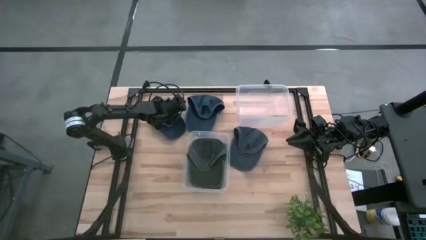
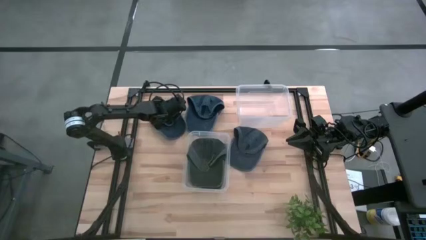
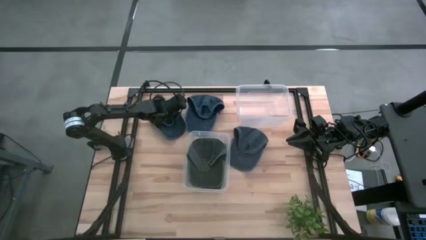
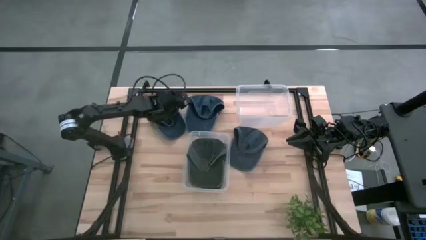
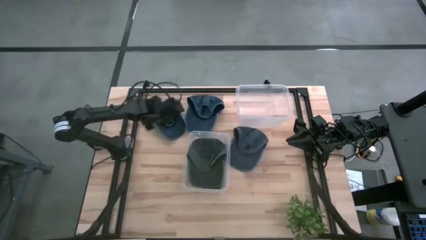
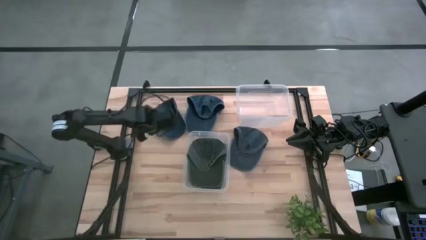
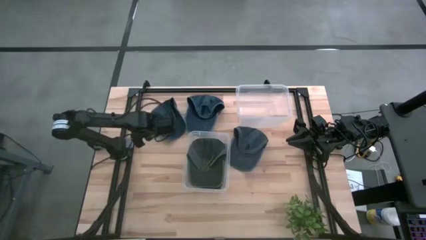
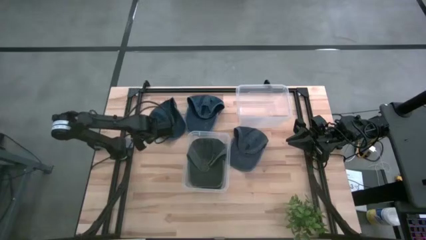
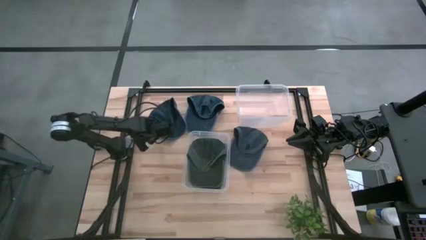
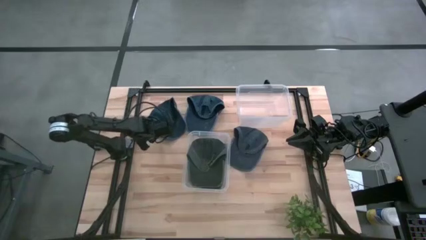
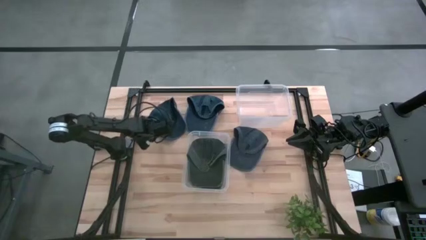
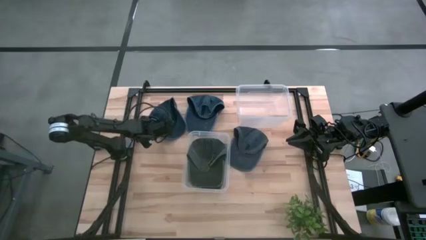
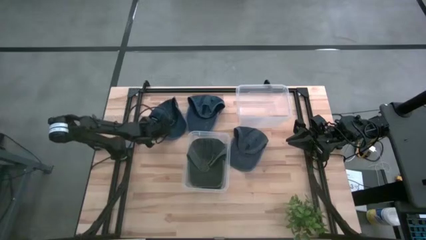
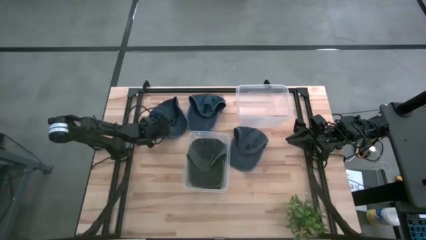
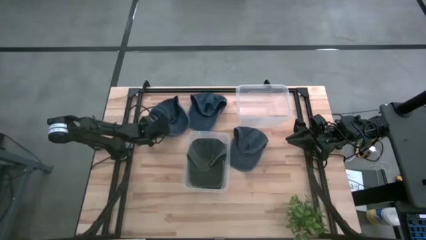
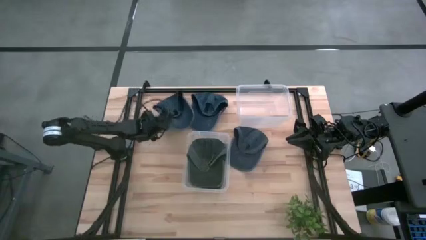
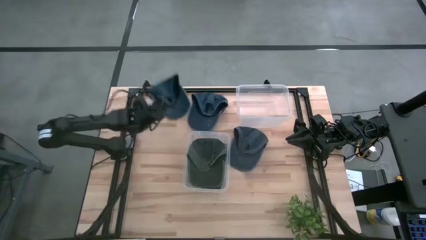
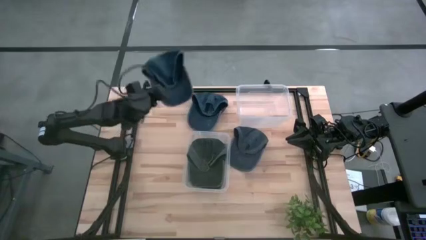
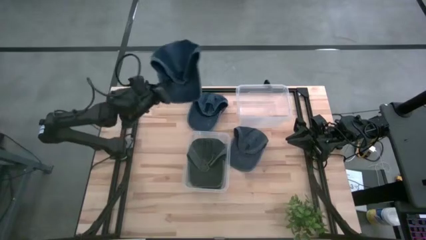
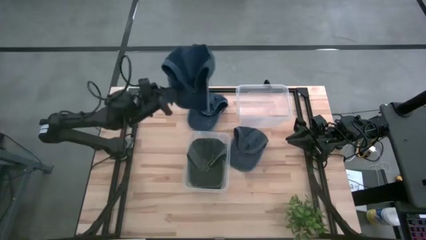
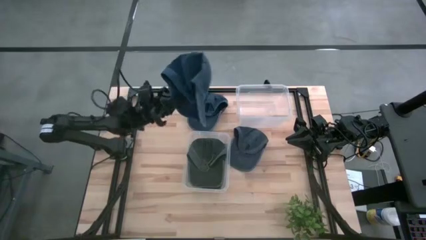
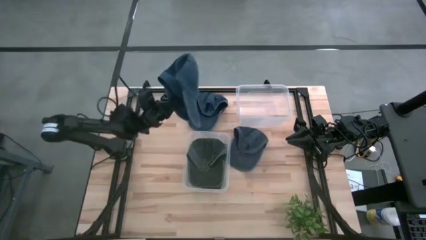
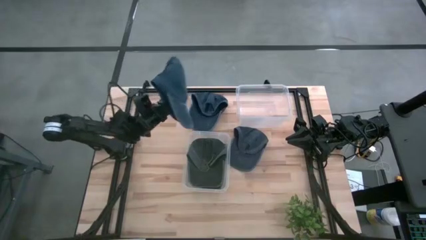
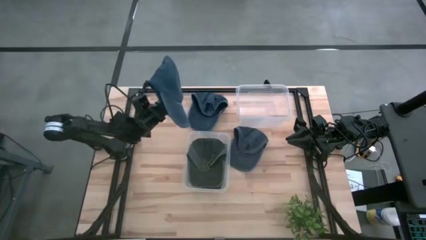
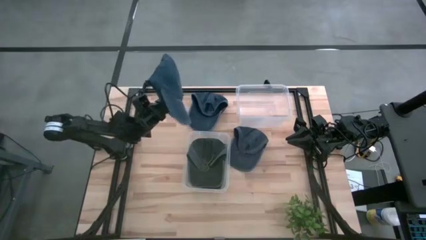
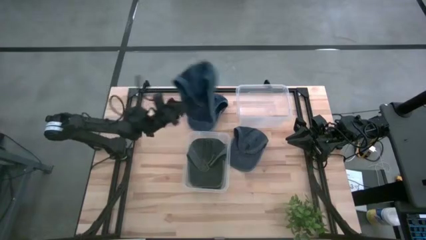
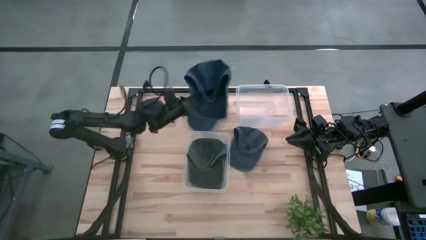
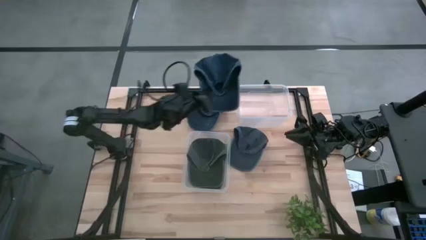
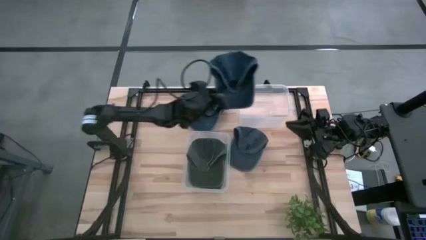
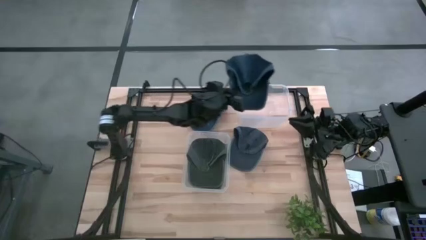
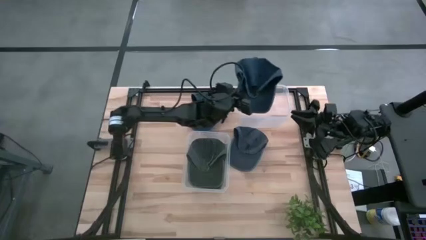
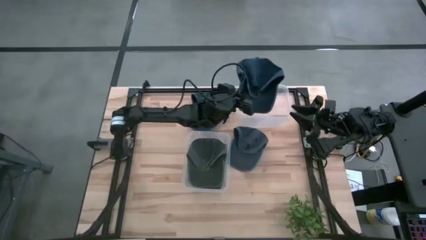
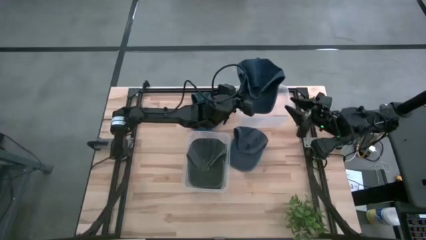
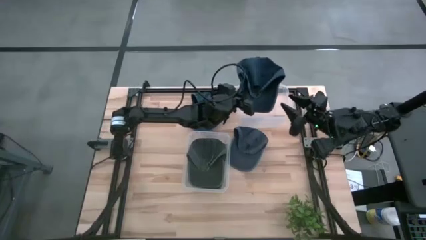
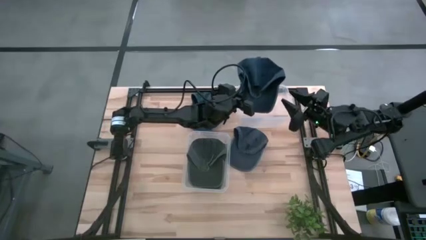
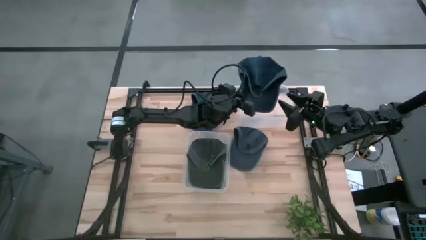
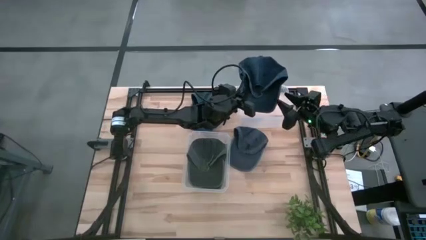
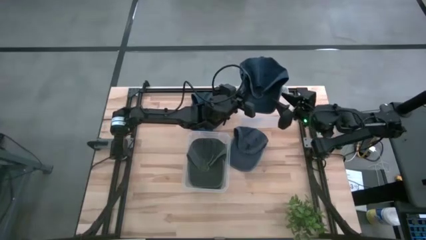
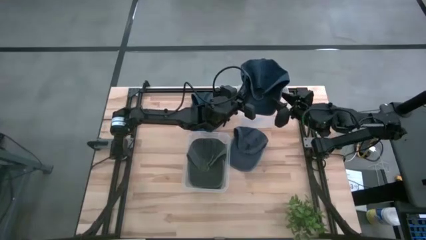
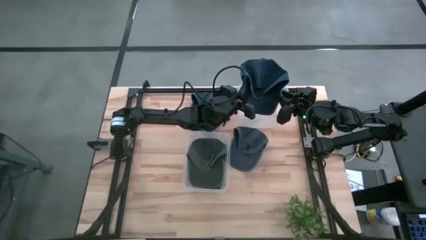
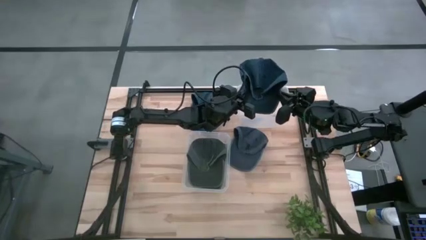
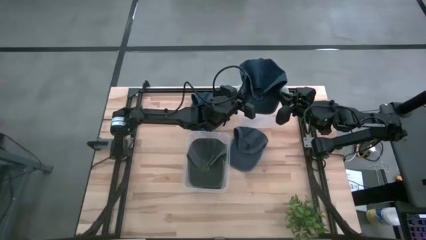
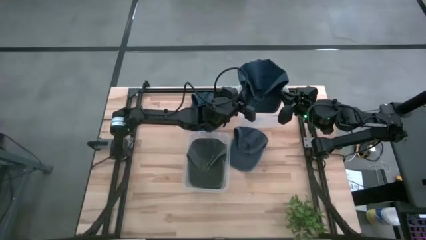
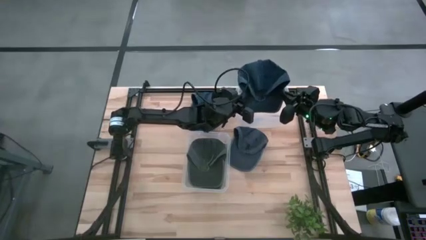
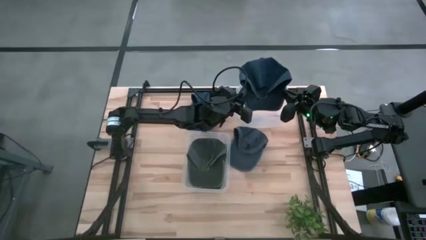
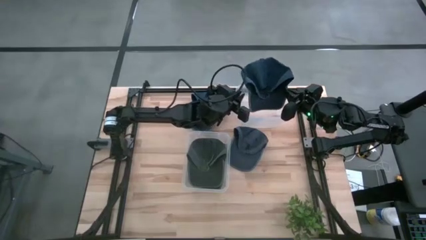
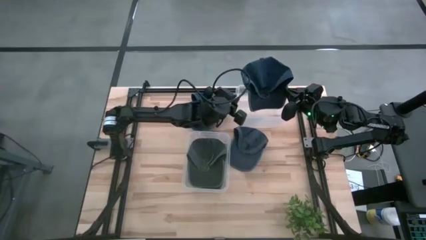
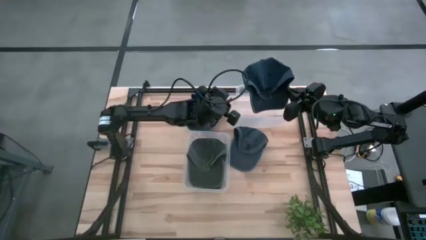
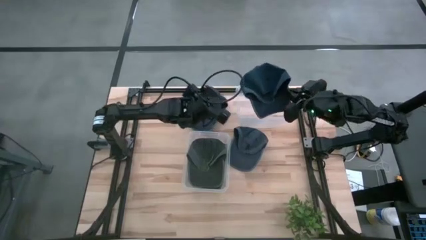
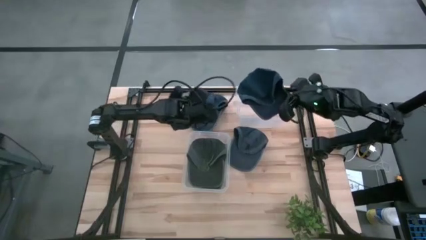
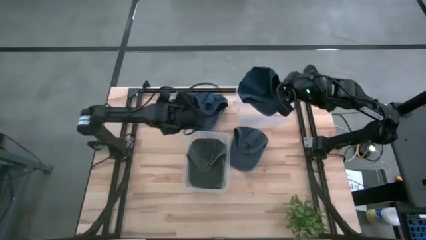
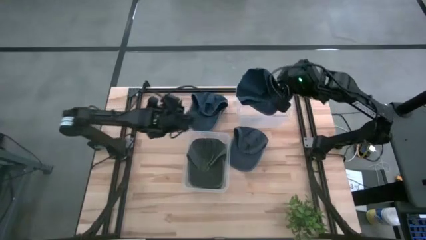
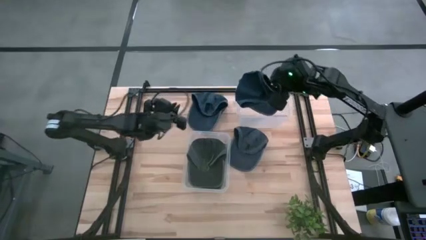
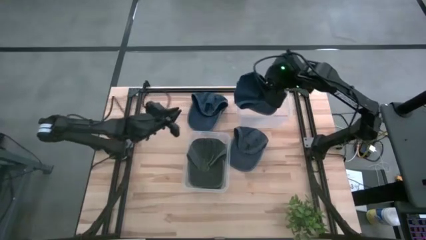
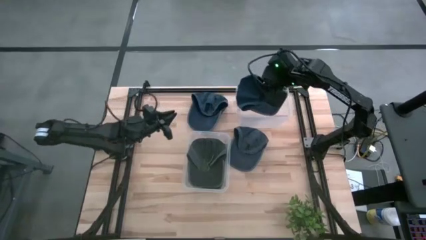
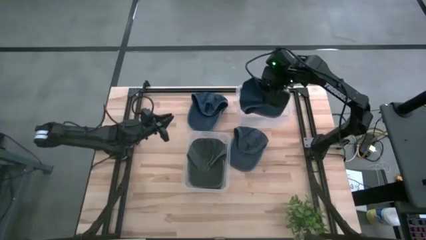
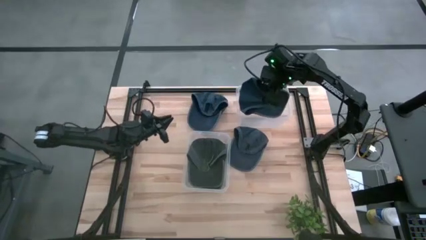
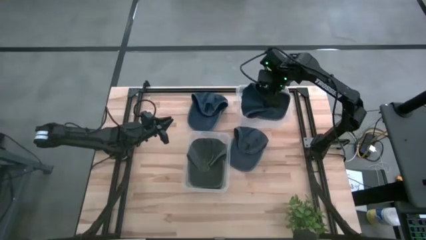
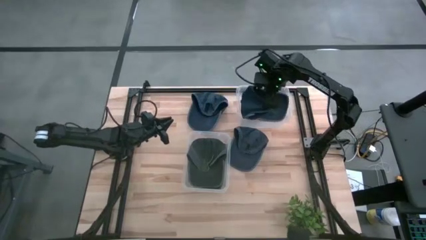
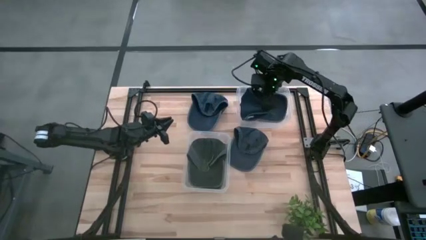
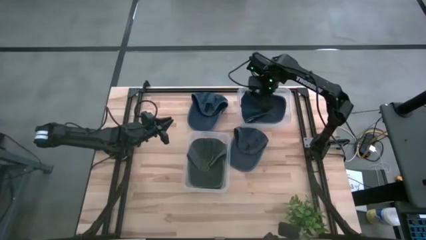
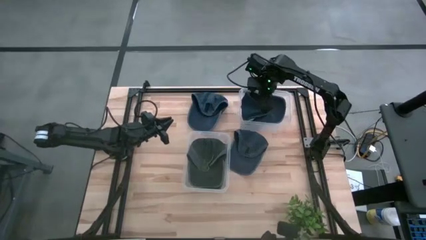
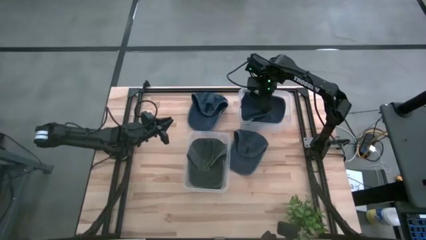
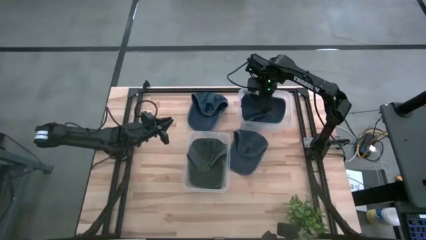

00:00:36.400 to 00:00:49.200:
Task: Pick & Place hat
Put the bottom left blue cap into the top transparent bin

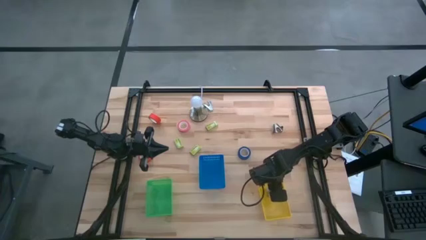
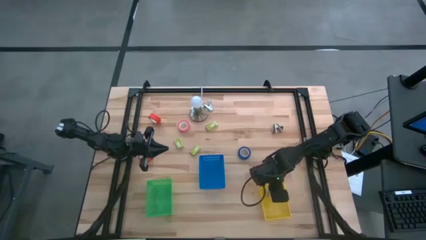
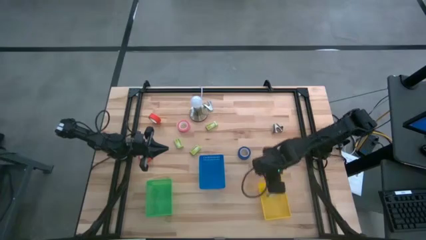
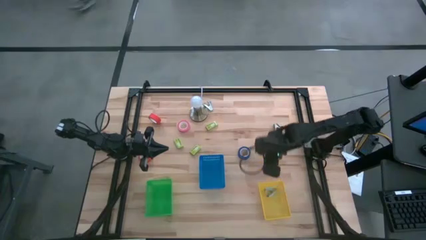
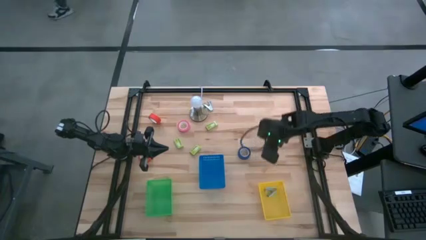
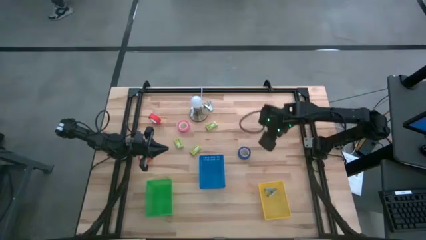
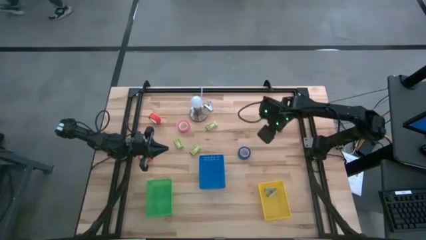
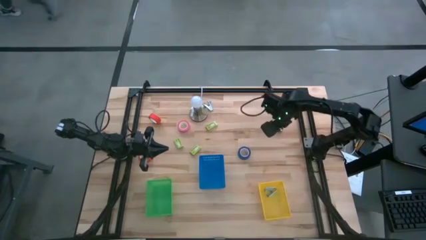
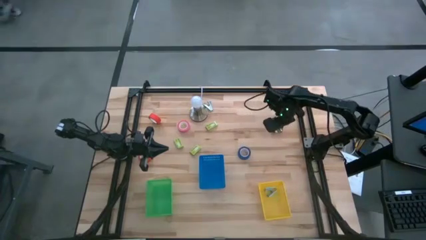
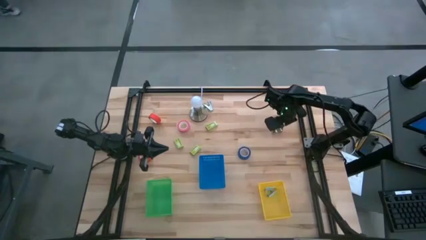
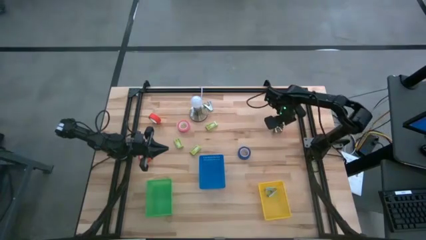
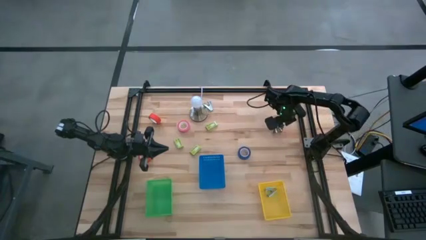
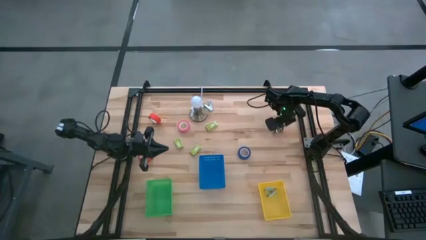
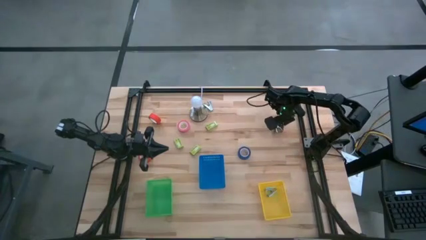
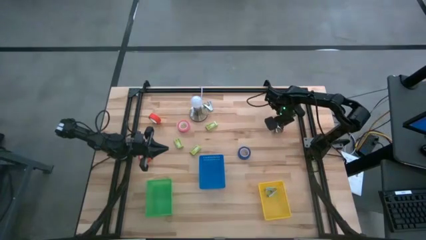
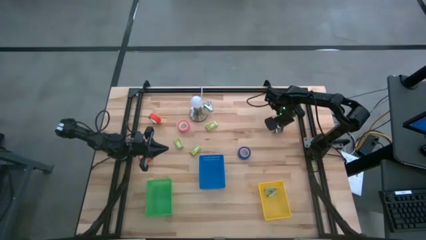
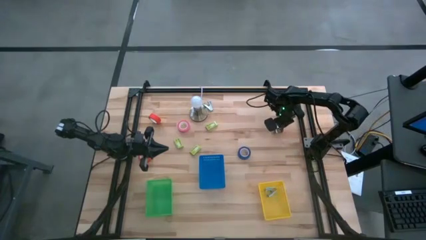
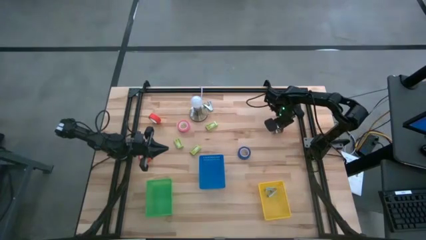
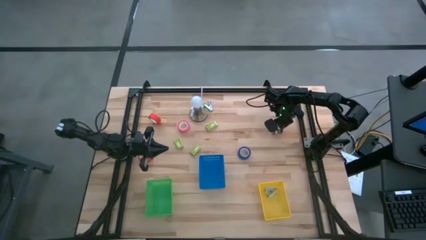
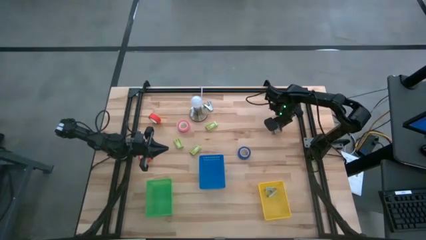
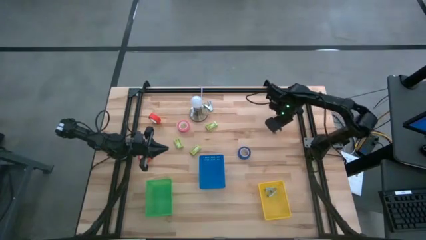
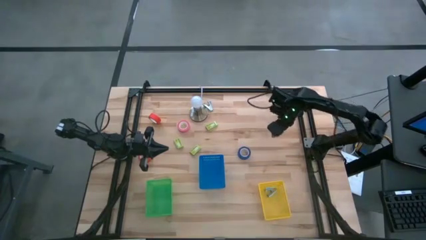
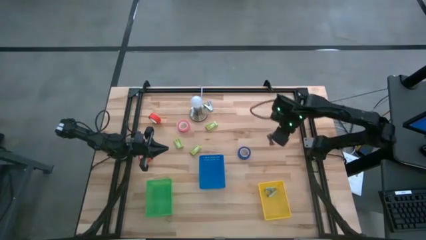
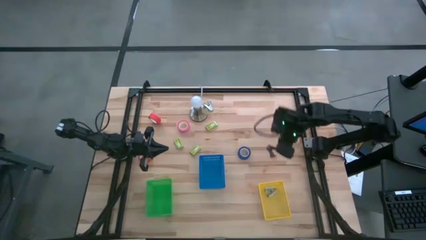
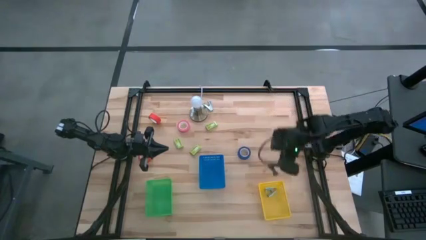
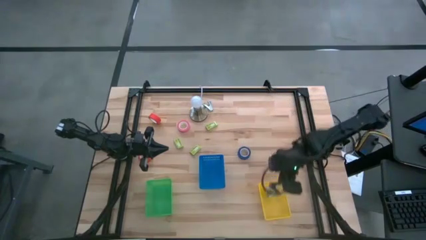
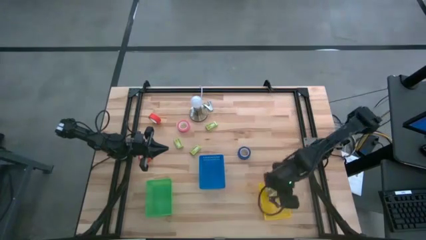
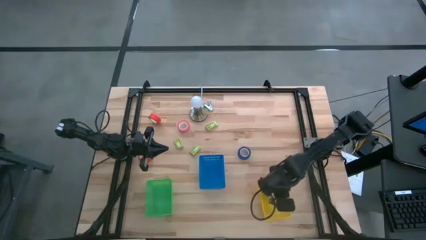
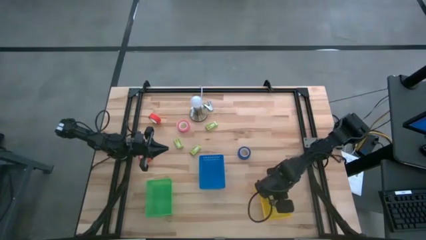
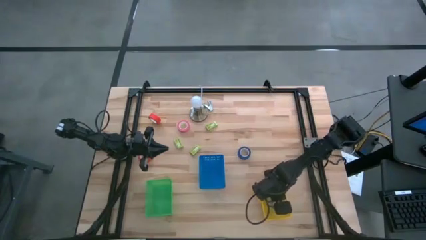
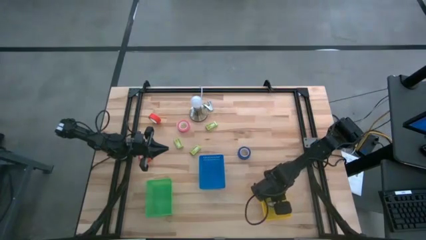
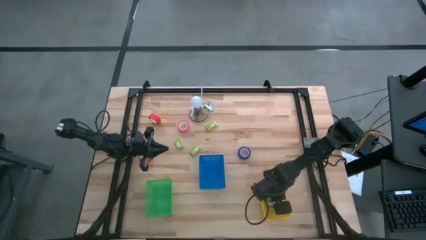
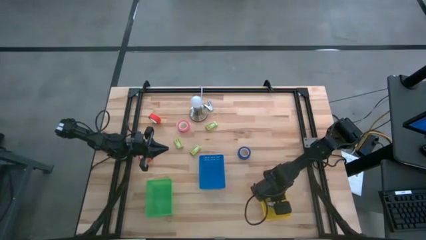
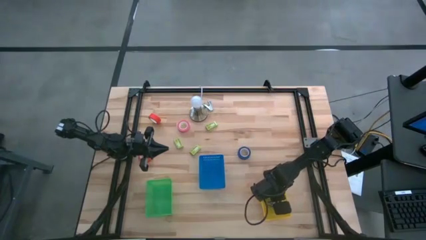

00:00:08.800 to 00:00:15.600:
Task: Pick and place Stapler, Stapler remover, tape
Put the black staple remover into the yellow bin
